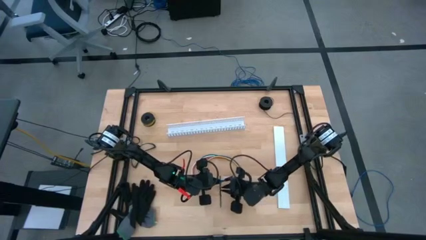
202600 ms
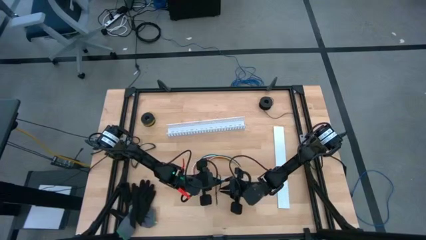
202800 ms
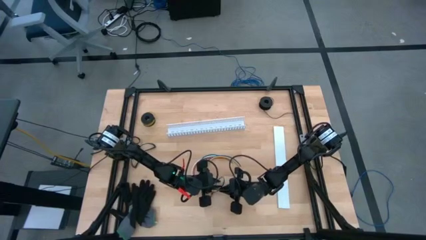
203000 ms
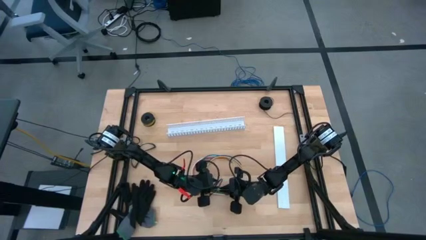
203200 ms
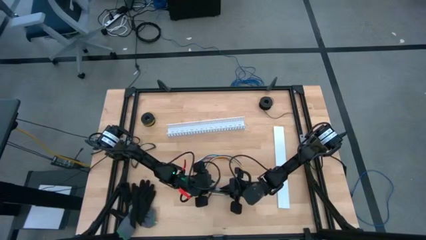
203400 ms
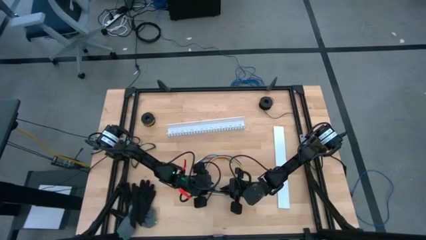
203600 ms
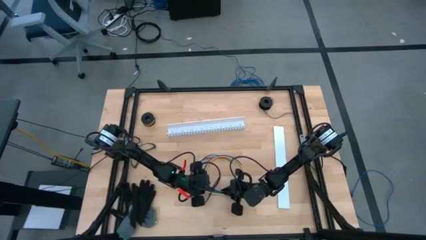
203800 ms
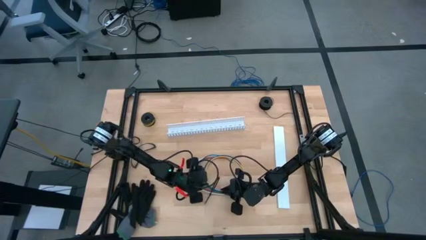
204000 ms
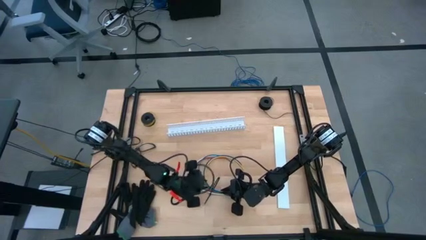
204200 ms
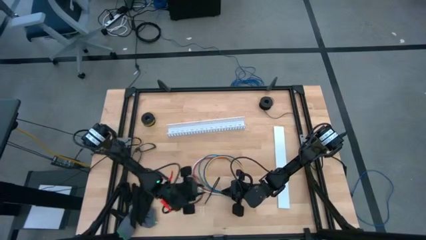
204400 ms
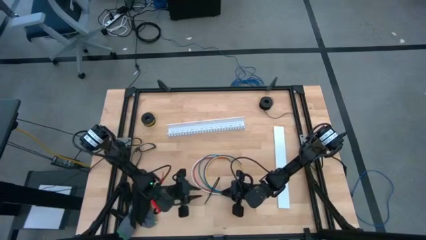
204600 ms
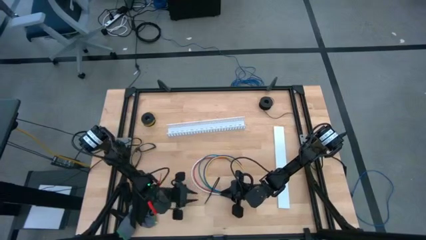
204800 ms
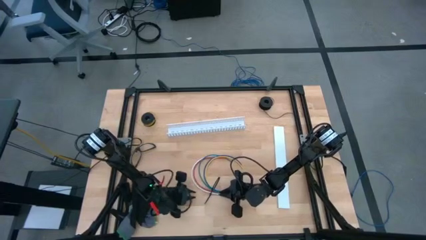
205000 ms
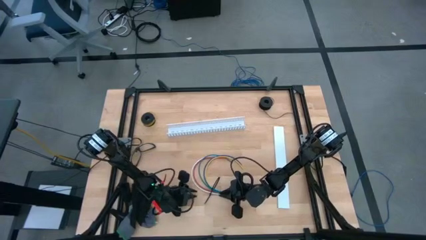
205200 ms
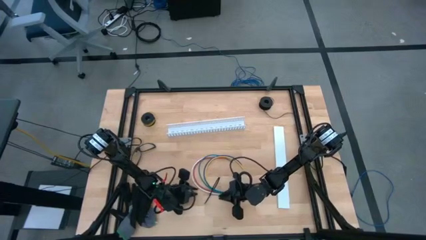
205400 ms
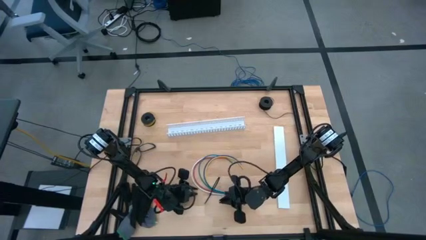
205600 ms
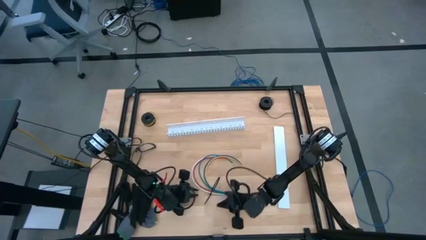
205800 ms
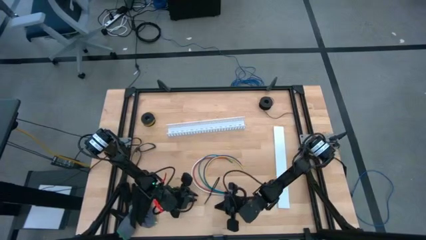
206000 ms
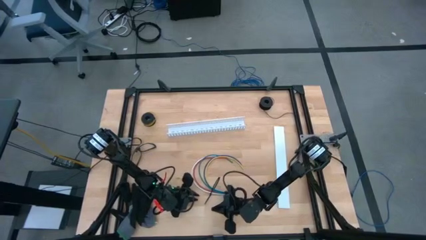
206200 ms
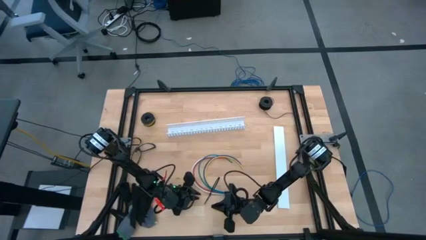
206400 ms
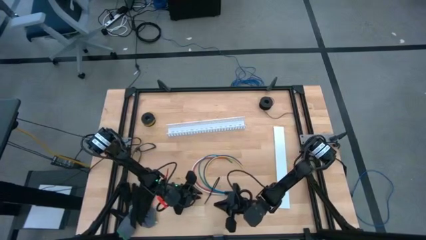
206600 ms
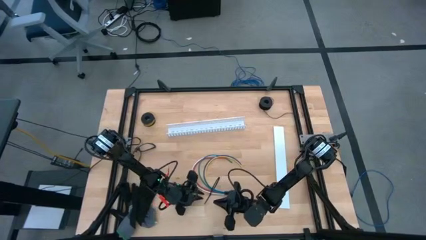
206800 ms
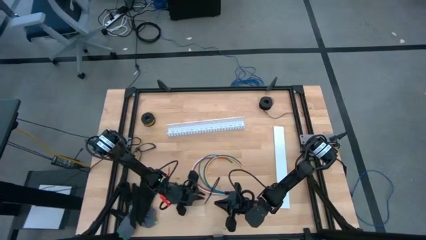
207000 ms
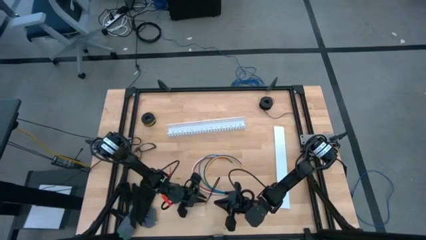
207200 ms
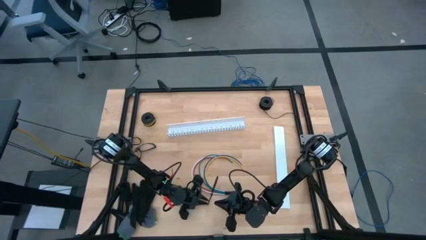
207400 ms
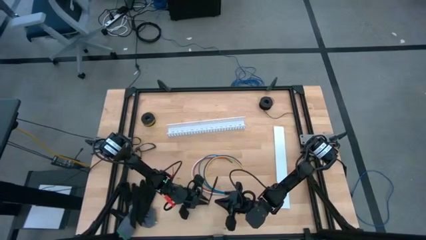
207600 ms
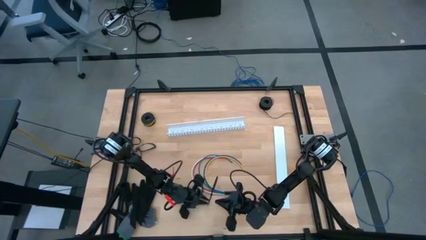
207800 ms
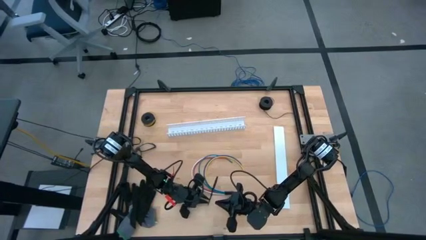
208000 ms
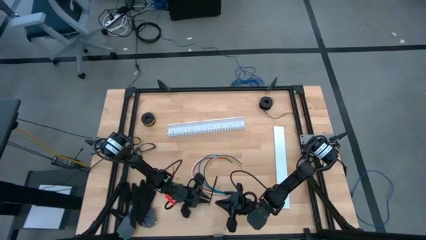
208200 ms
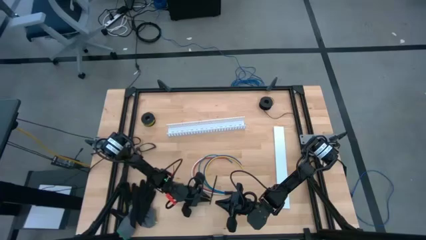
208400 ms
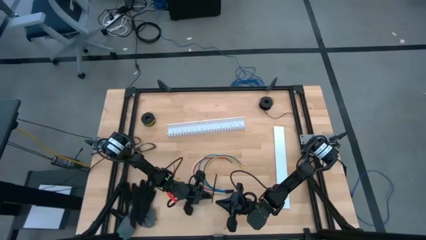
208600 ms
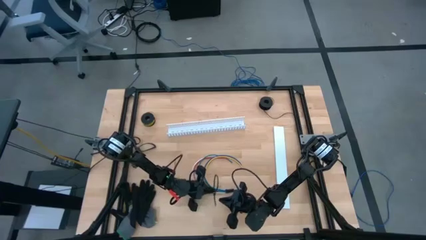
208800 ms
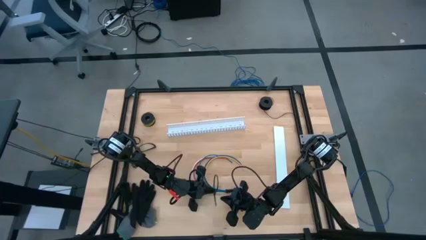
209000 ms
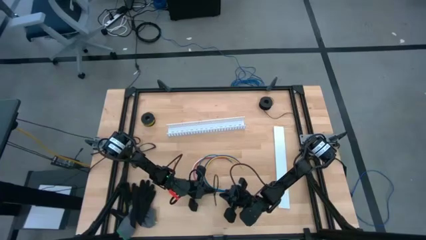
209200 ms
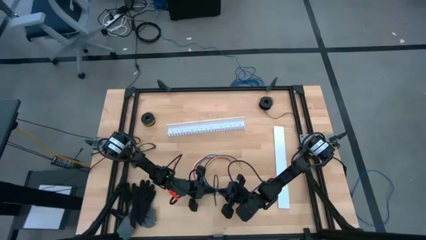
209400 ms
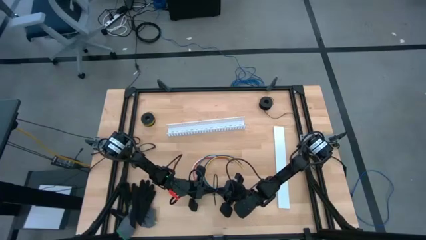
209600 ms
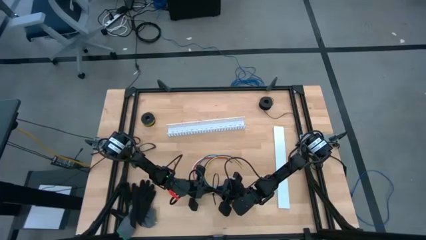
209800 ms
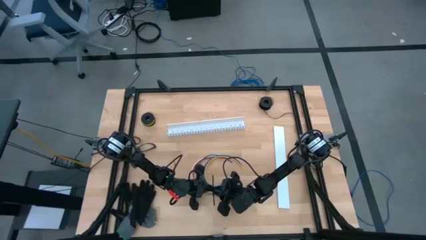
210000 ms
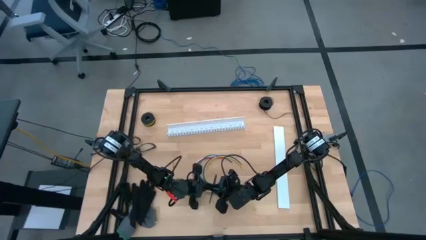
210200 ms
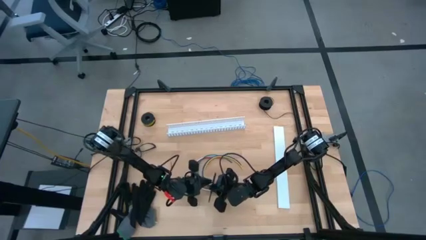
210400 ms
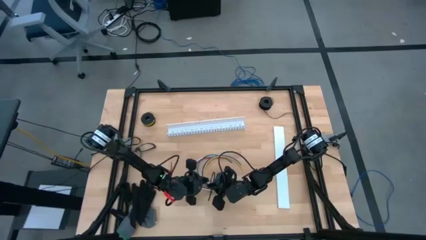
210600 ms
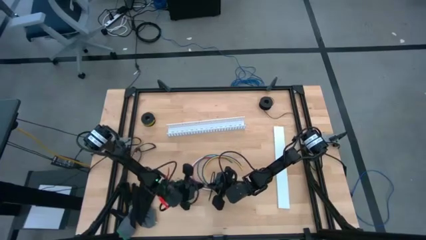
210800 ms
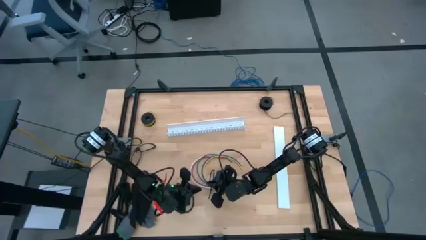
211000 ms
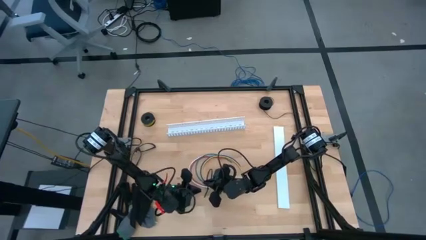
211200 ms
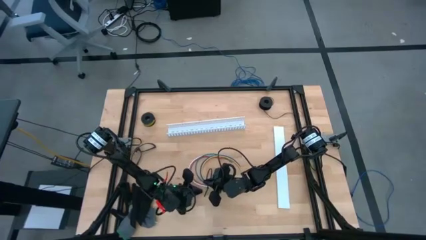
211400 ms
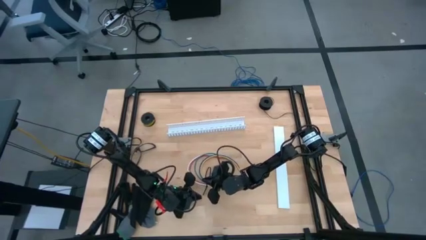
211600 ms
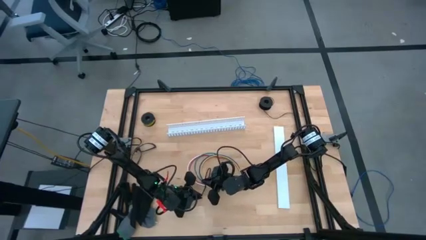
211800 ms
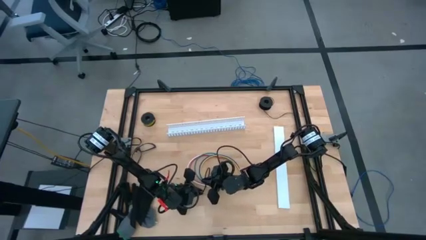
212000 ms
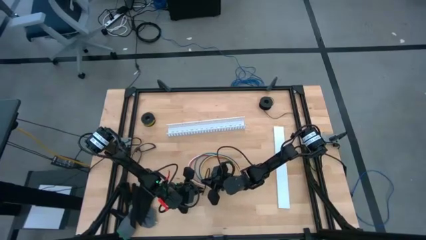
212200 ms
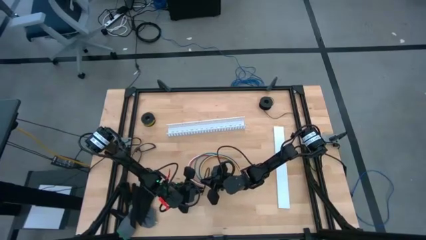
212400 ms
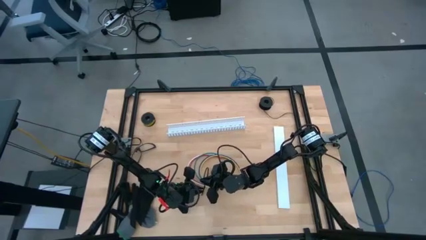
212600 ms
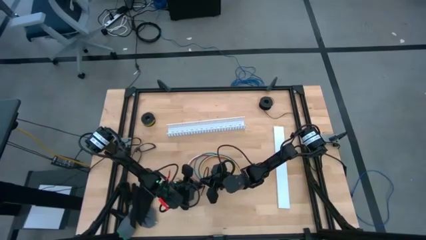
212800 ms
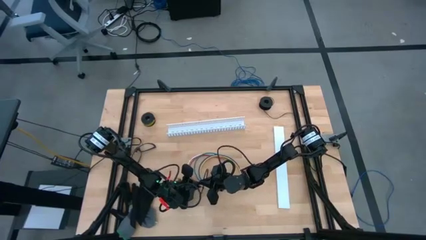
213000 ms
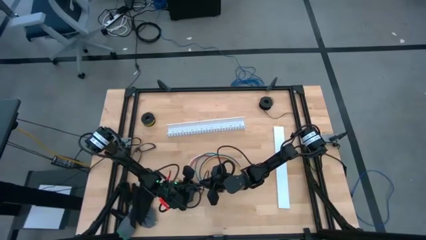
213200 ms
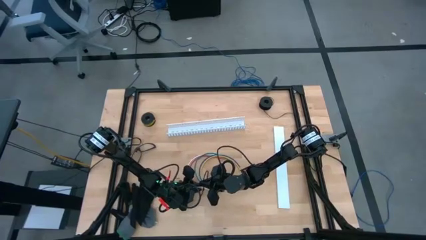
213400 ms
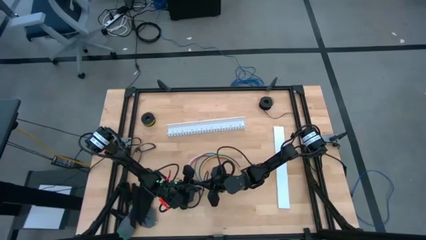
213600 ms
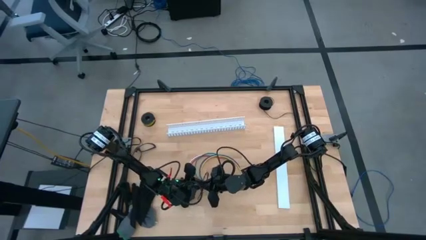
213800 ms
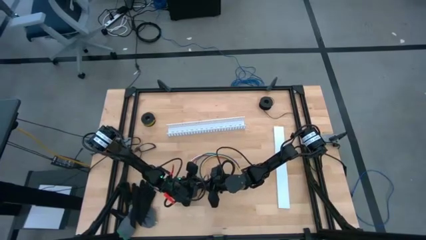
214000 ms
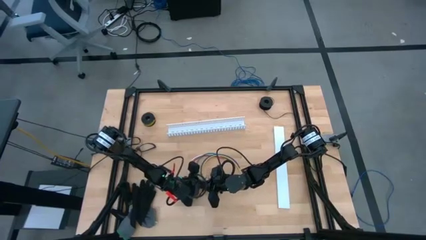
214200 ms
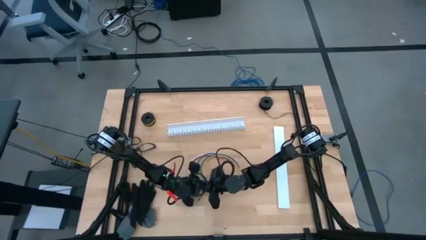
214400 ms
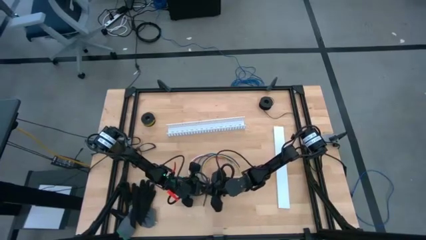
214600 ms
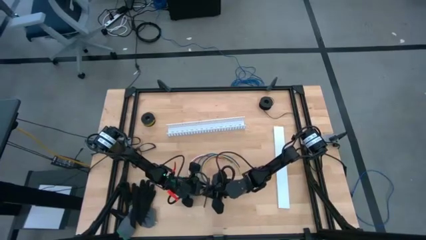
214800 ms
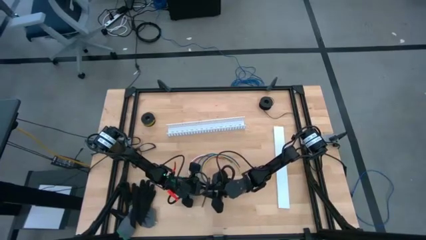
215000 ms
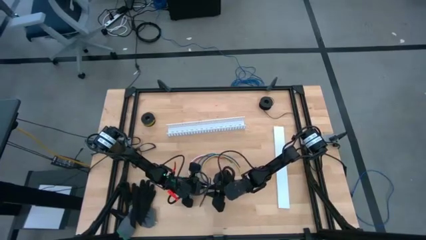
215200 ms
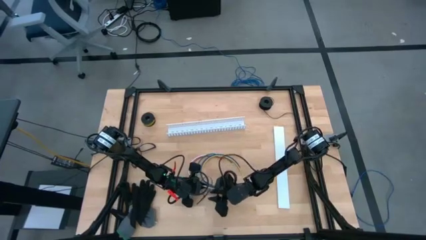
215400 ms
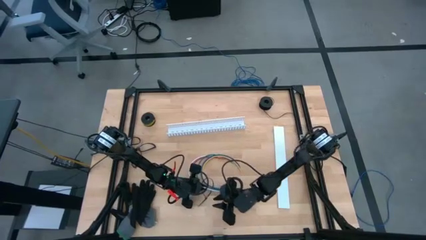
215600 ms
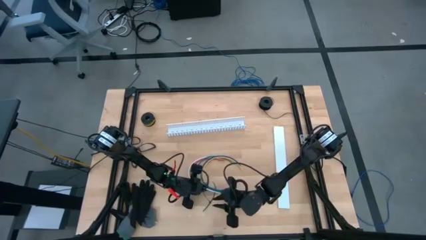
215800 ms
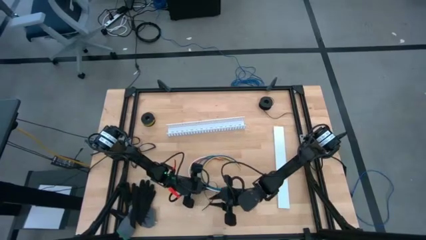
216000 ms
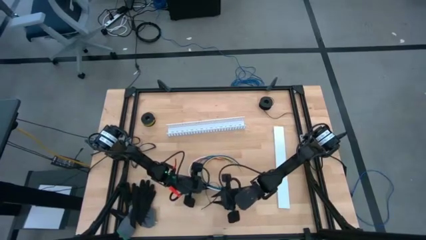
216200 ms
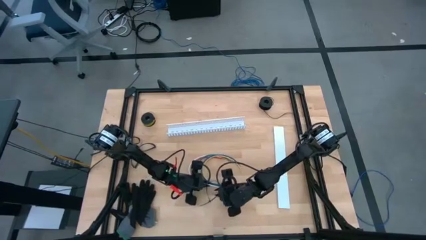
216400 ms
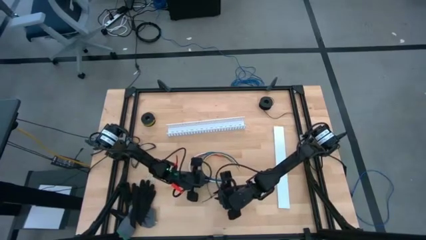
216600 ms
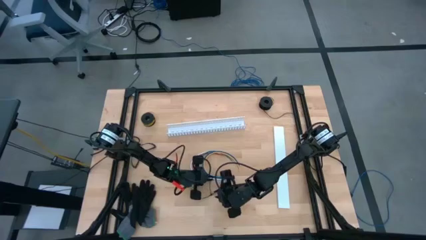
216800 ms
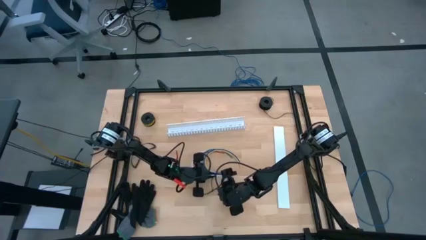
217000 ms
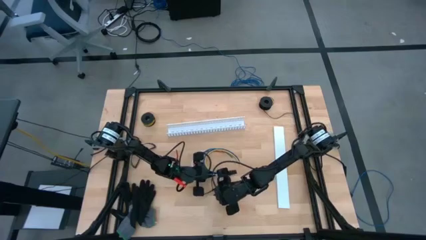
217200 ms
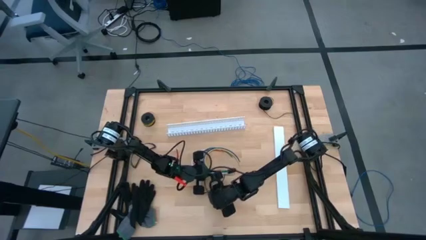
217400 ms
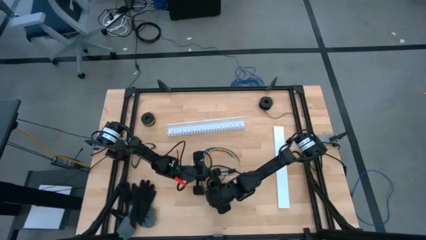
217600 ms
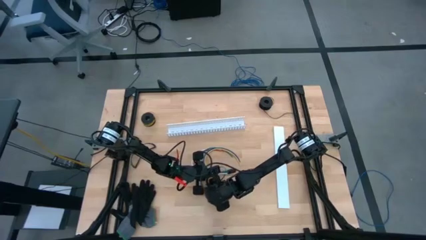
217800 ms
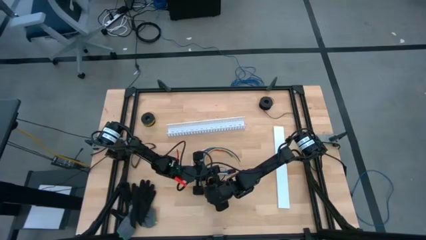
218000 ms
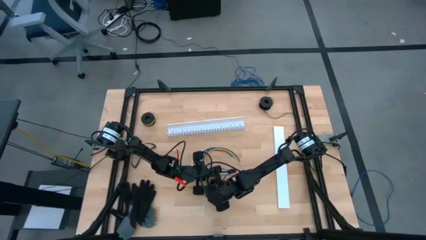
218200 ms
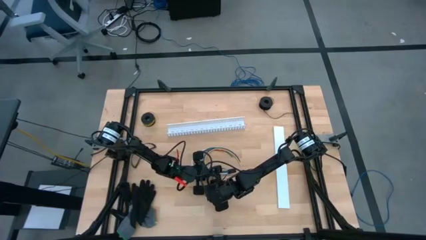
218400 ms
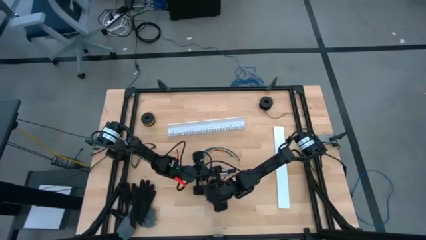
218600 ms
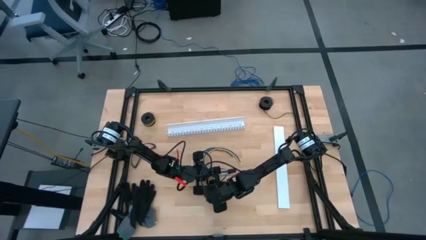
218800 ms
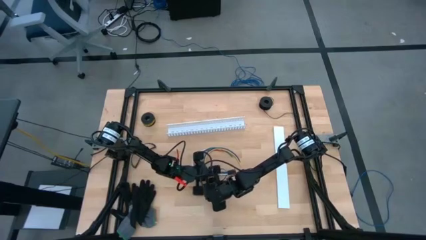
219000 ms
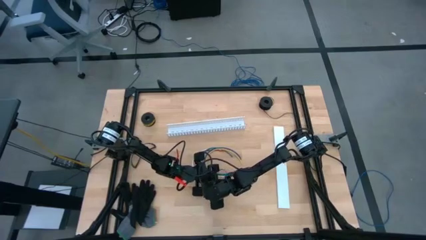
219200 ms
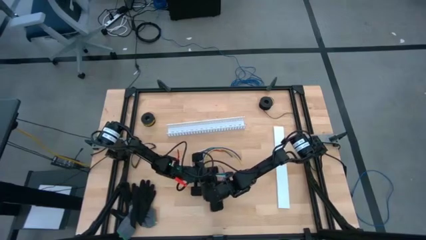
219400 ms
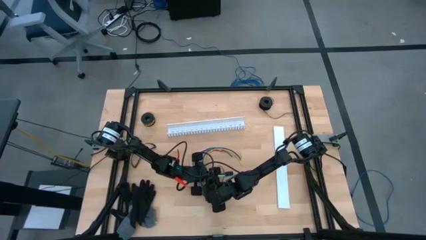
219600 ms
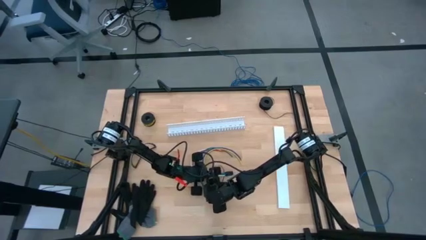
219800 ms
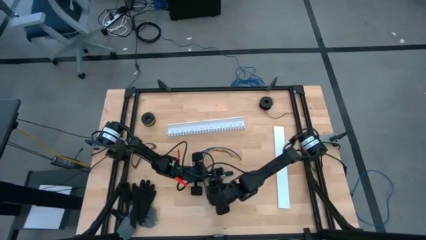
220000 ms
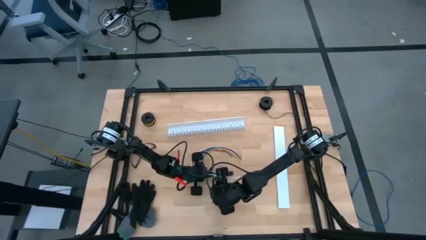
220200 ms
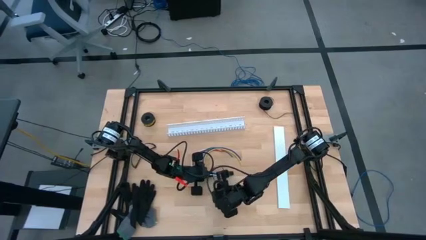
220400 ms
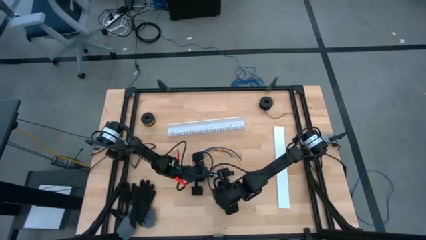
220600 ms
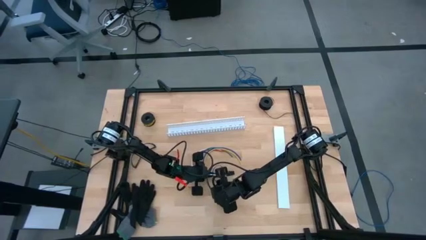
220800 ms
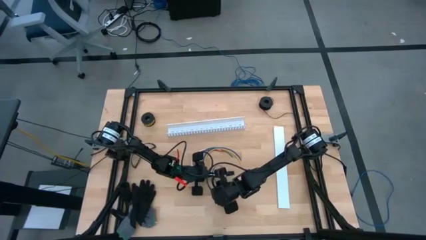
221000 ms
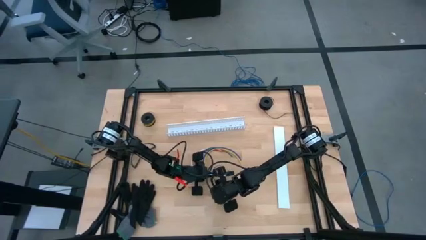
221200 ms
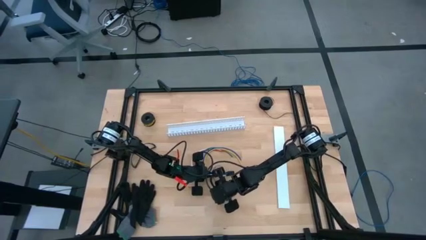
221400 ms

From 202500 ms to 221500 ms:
Task: Ziptie cables
Insert zip tie on the cable wire
